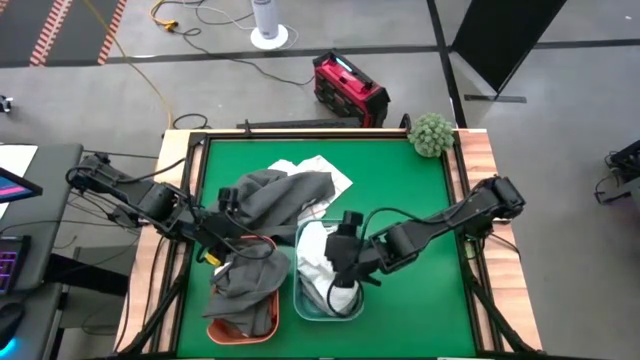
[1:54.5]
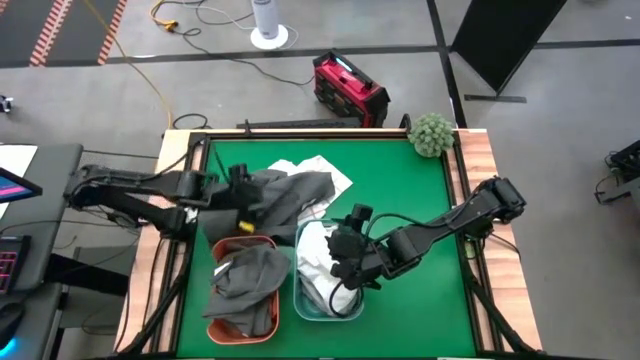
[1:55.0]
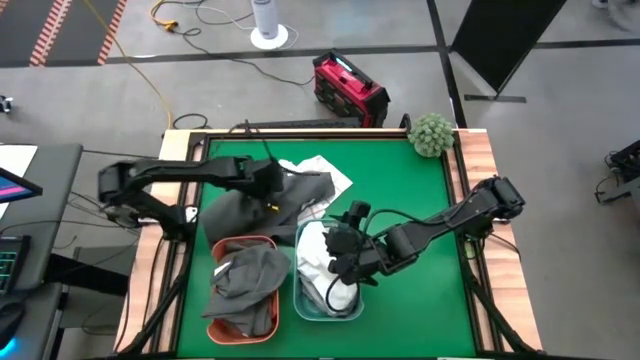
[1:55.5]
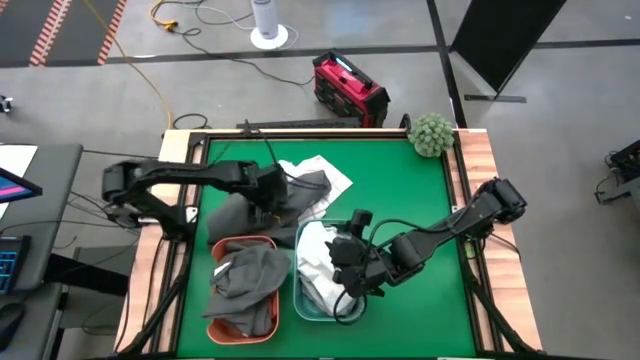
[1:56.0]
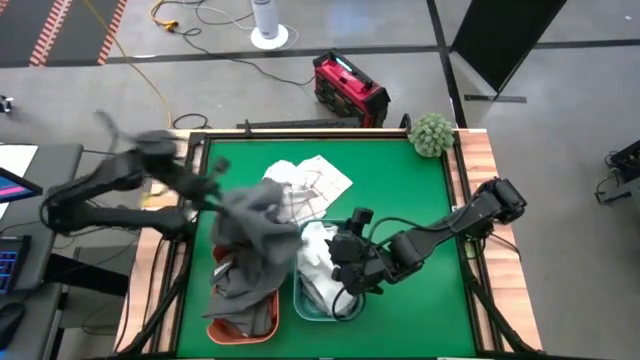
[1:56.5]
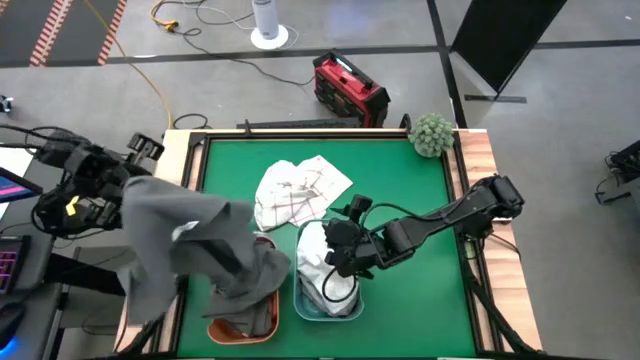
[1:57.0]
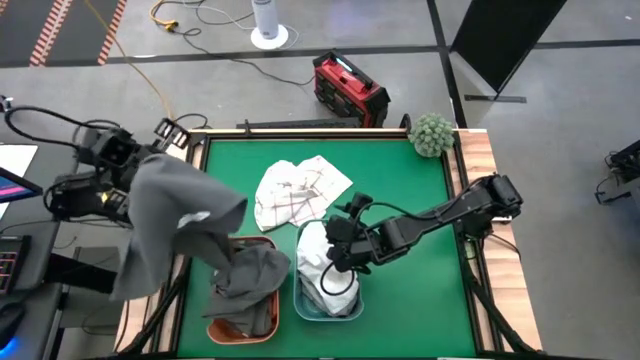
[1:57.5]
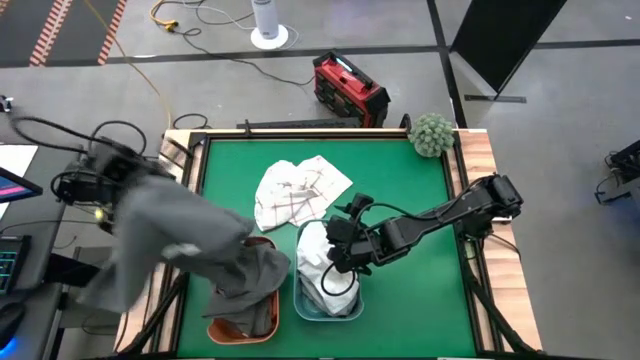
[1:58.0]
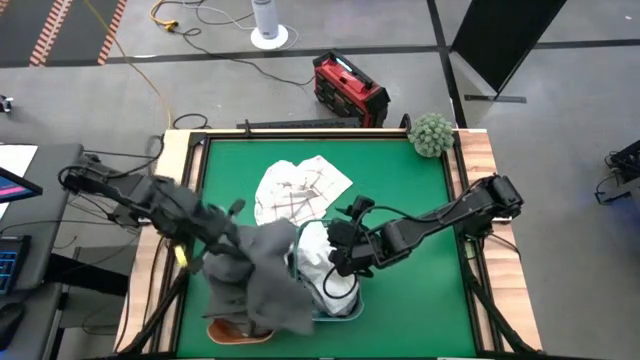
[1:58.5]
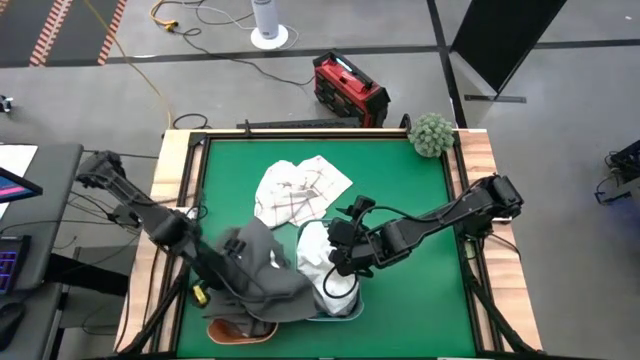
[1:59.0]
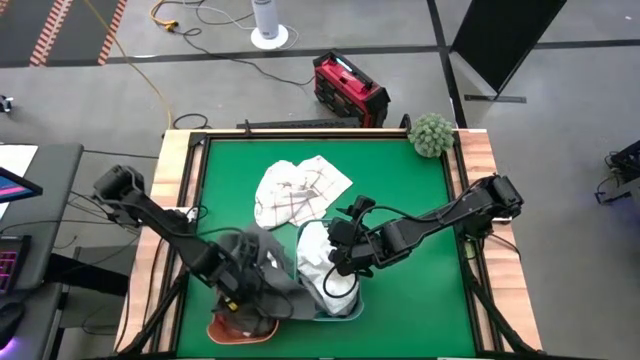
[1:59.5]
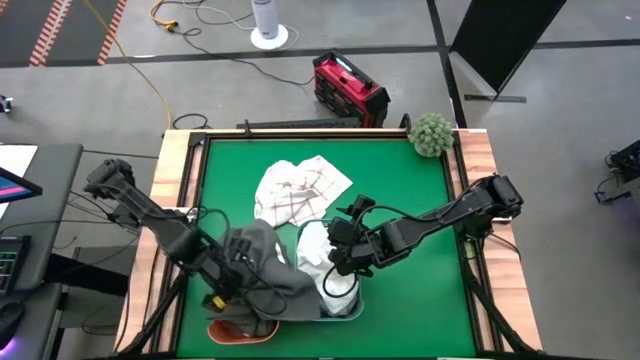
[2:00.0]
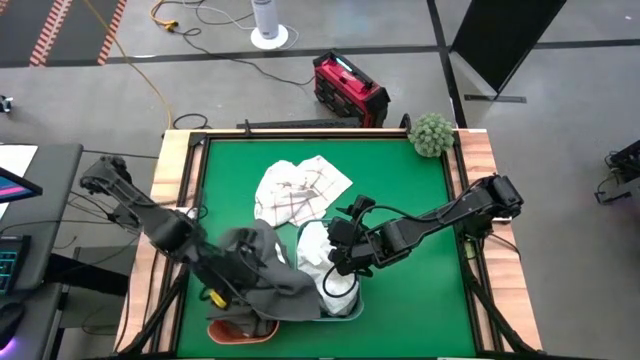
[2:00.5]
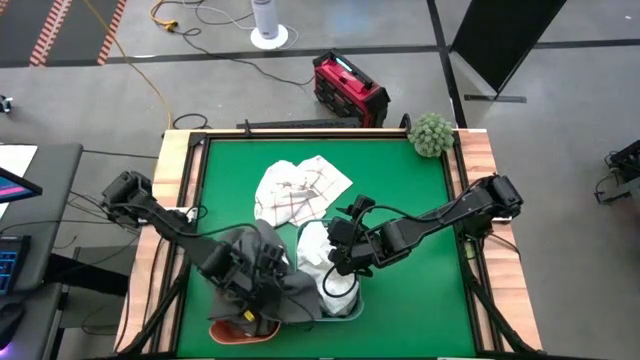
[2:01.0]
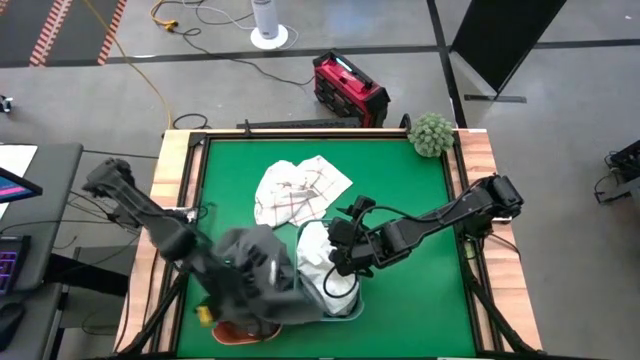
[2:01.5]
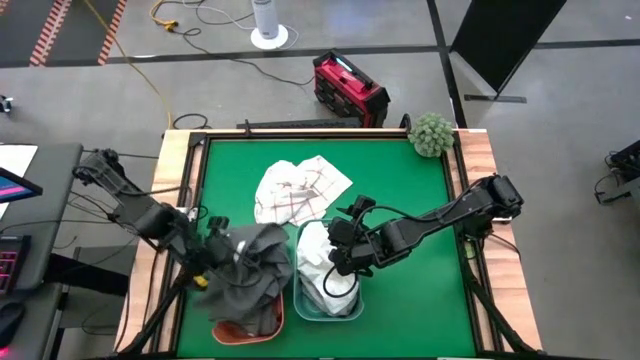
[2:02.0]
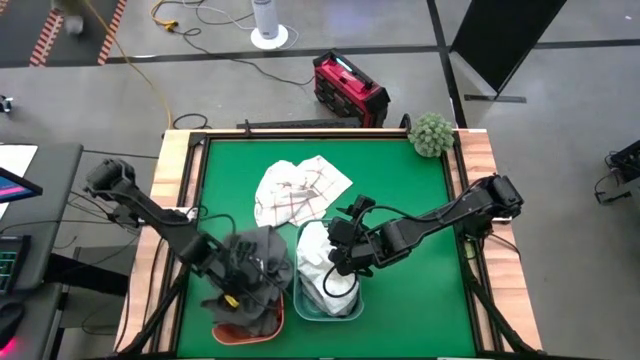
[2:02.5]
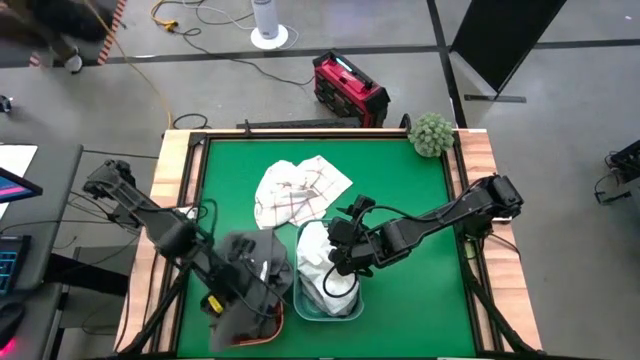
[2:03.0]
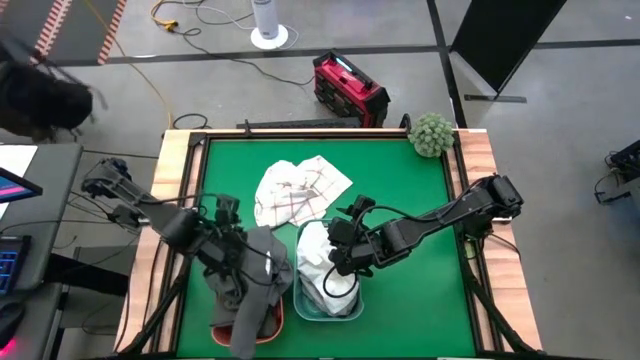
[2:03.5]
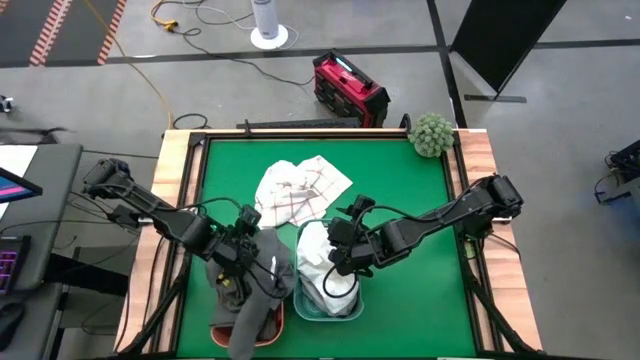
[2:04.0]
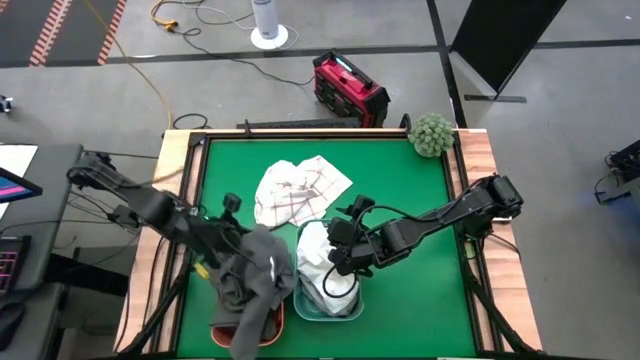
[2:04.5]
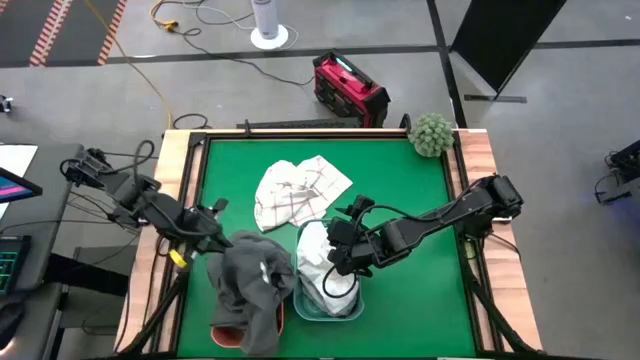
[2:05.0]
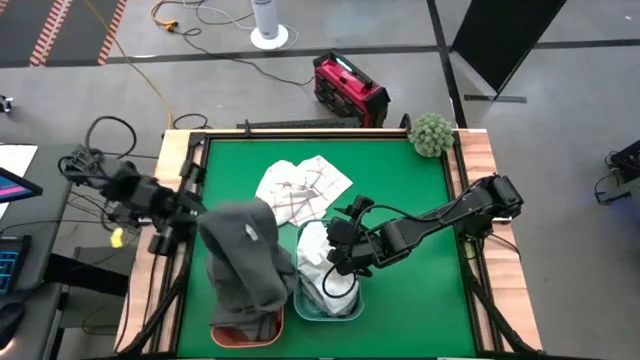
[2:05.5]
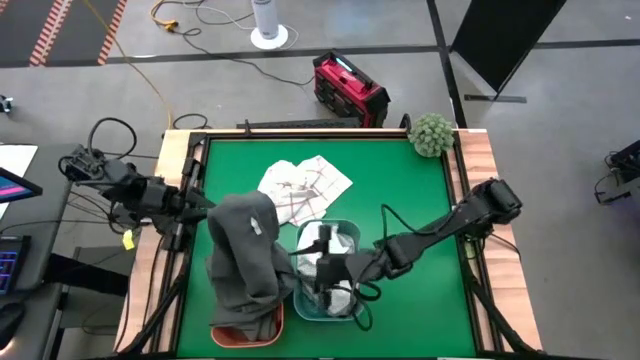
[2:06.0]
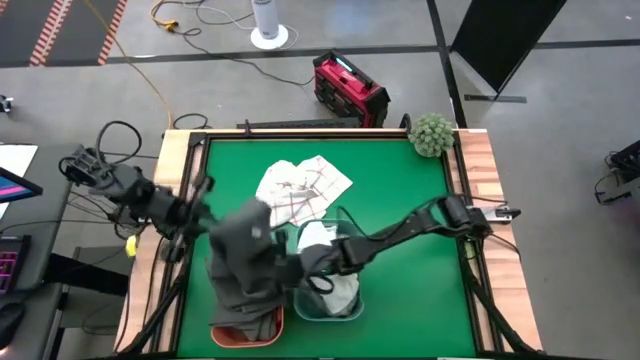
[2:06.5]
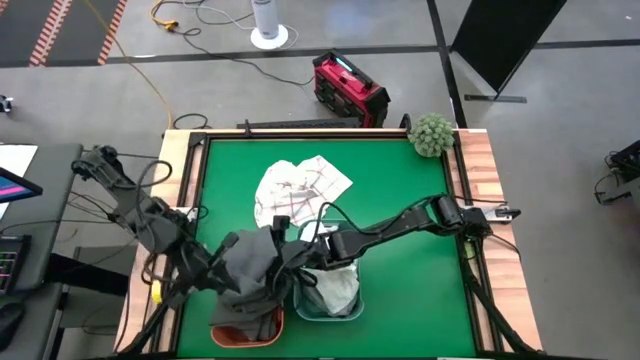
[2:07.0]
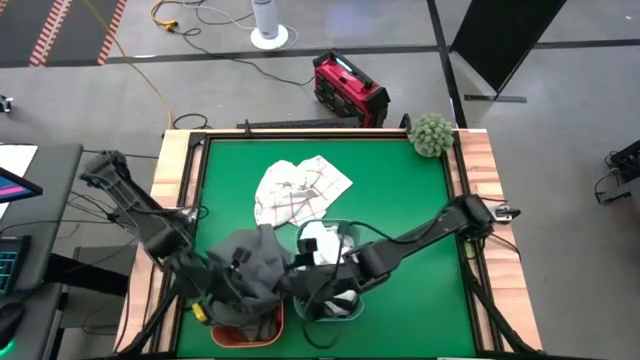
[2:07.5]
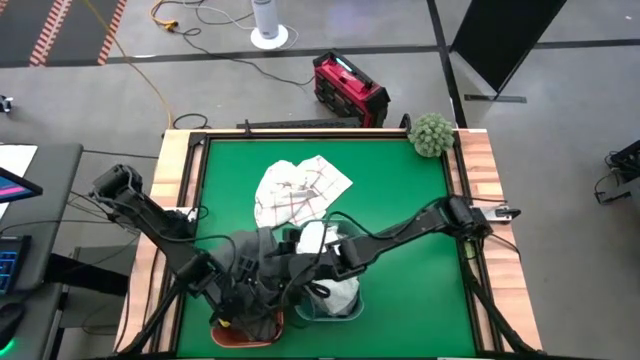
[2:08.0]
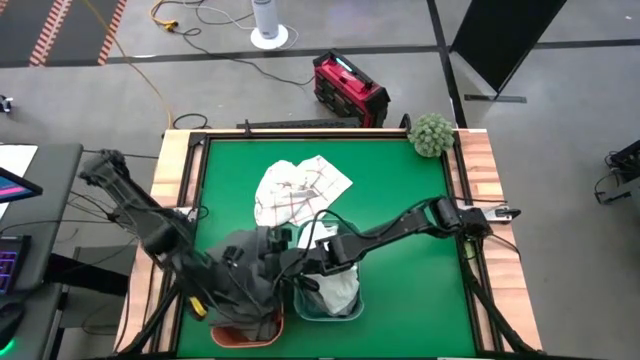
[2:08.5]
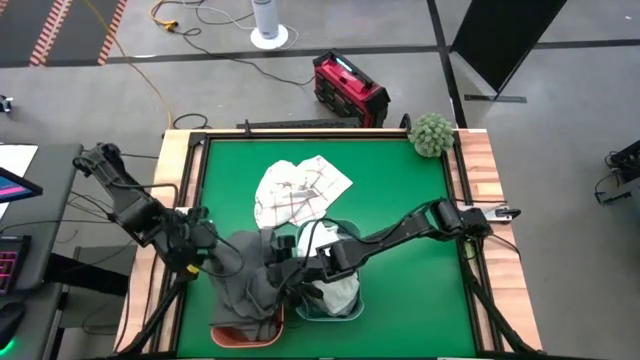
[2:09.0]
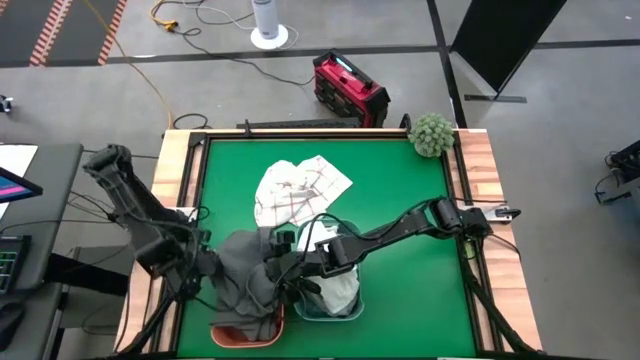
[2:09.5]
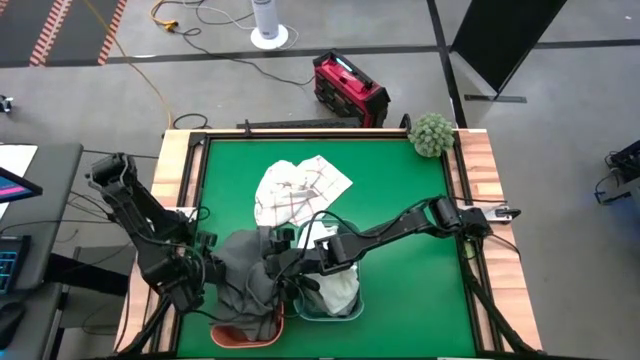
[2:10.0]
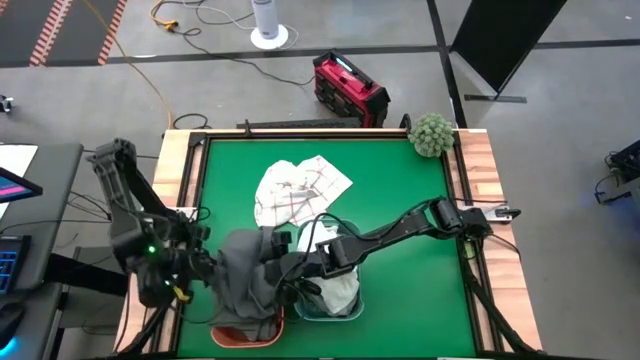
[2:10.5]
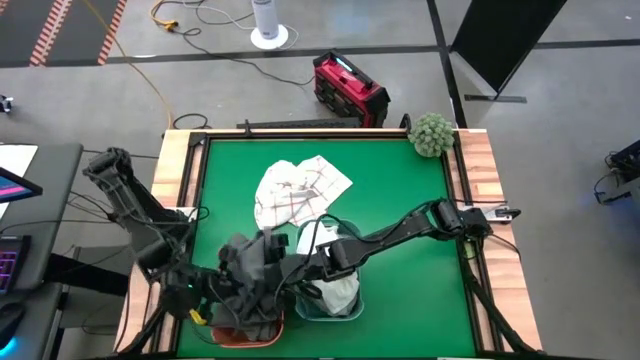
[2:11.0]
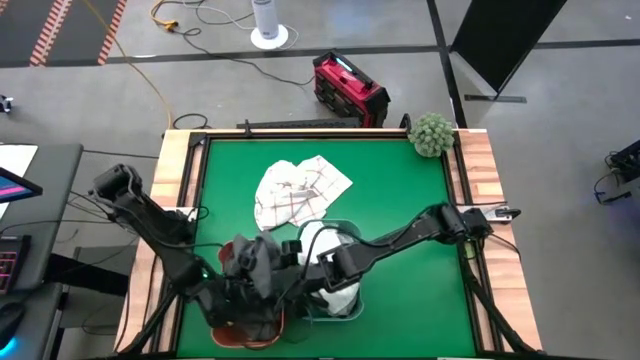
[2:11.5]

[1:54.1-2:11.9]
Task: Sort towels by color in basket
Put the black towel into the orange bin

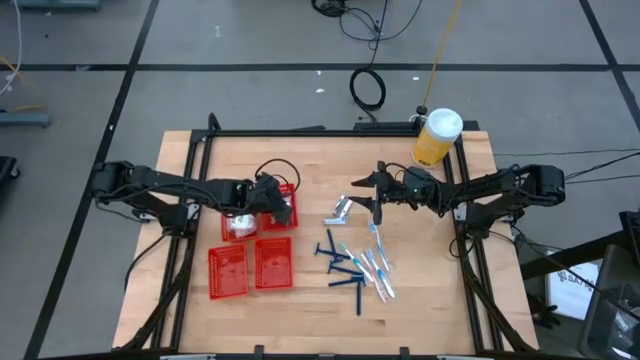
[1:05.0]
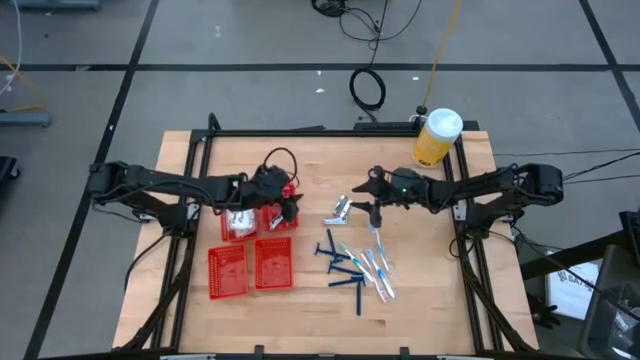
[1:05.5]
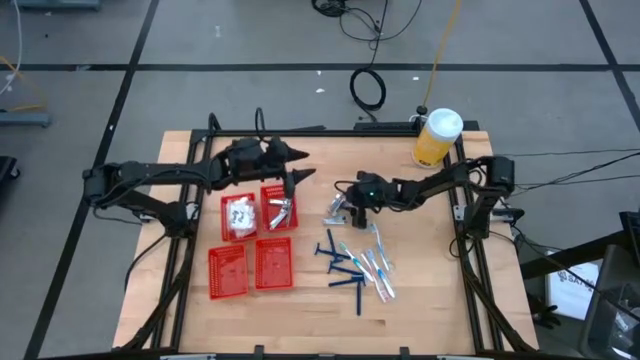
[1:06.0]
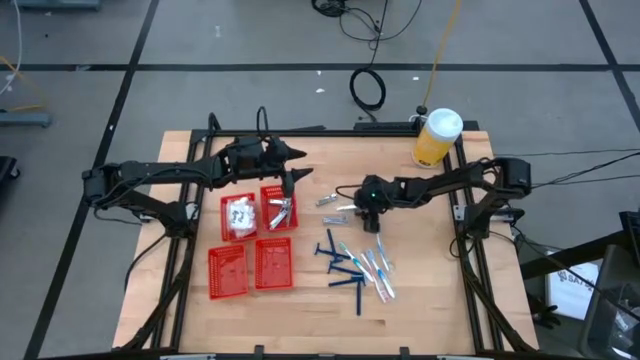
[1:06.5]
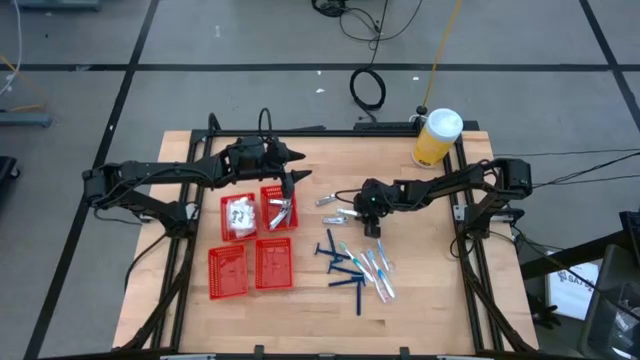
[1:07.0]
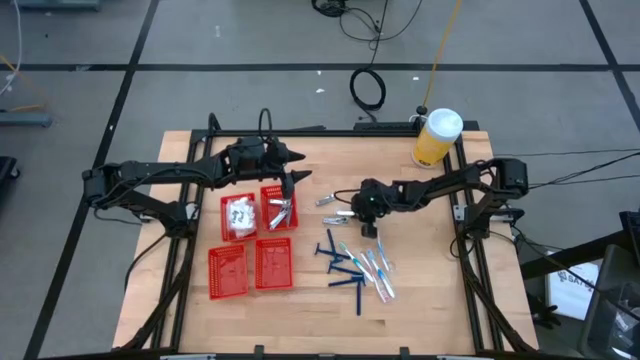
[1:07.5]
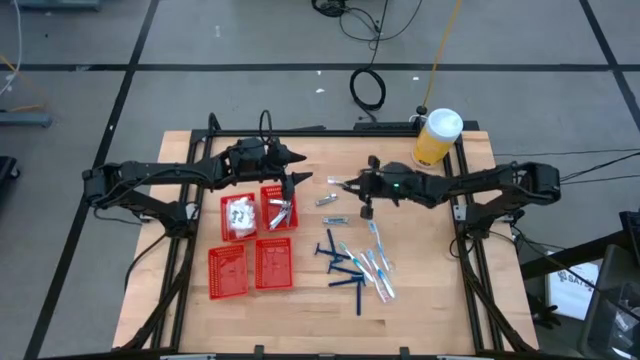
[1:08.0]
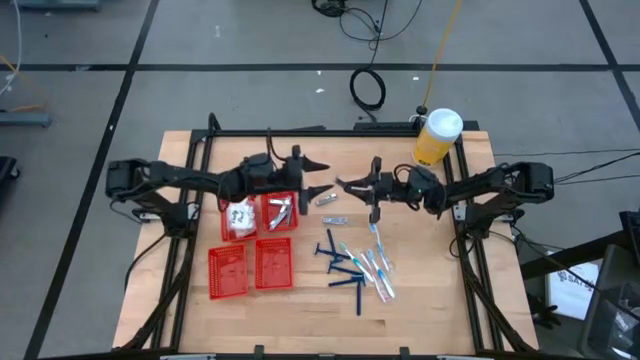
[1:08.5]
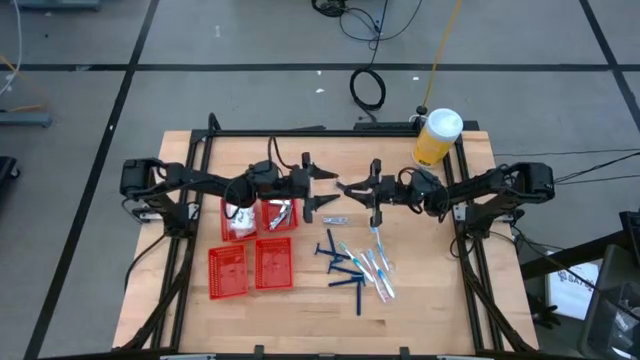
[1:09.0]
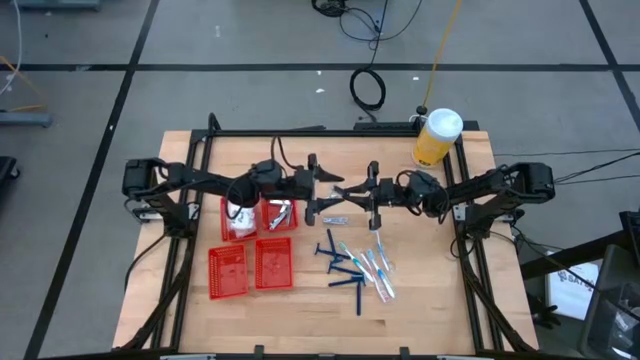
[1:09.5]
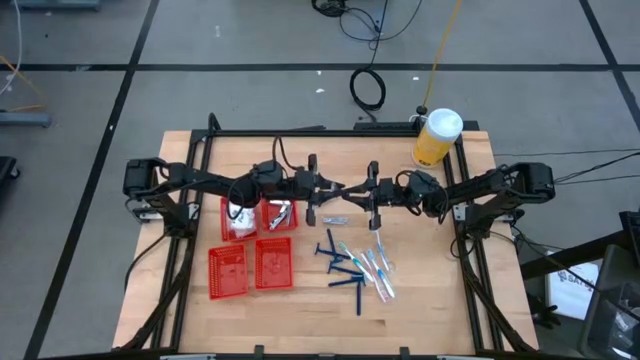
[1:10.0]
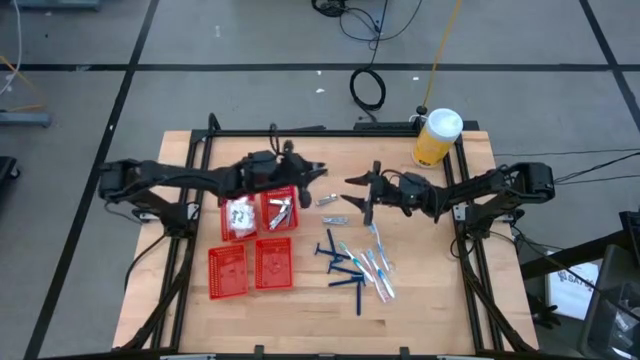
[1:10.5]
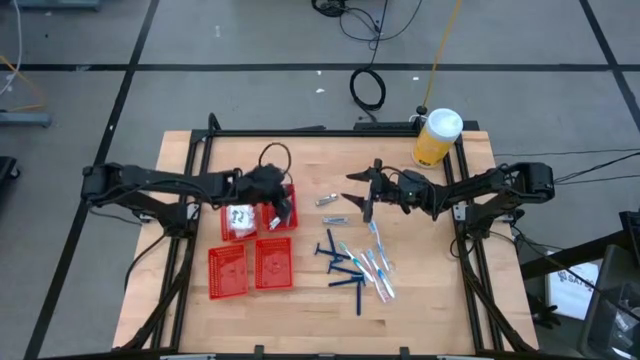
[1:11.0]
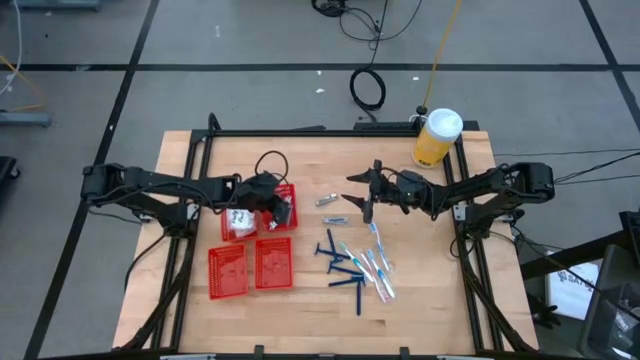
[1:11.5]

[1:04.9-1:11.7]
Task: Pick & Place Travel size toiletries
Put the silver nail cutter into the top right red basket
